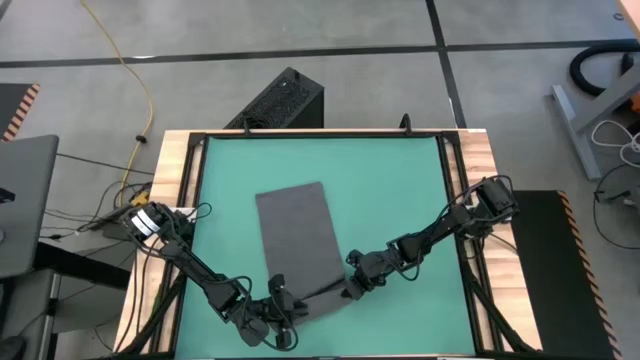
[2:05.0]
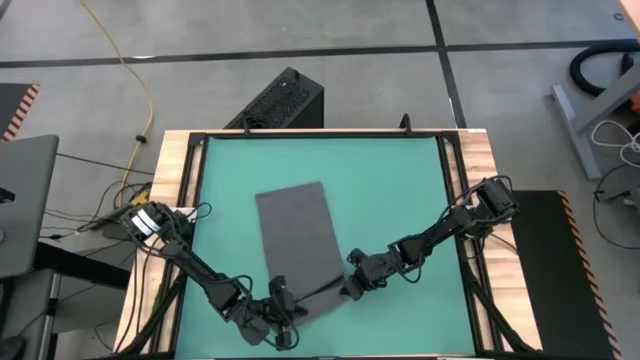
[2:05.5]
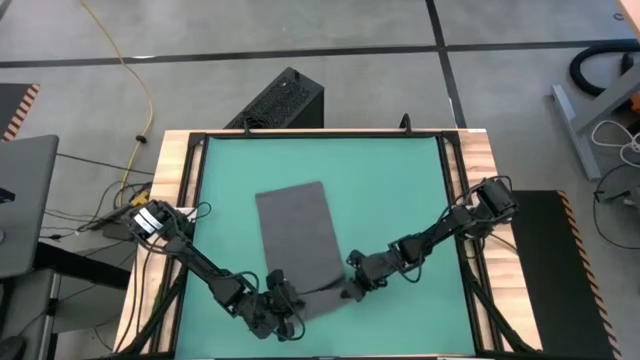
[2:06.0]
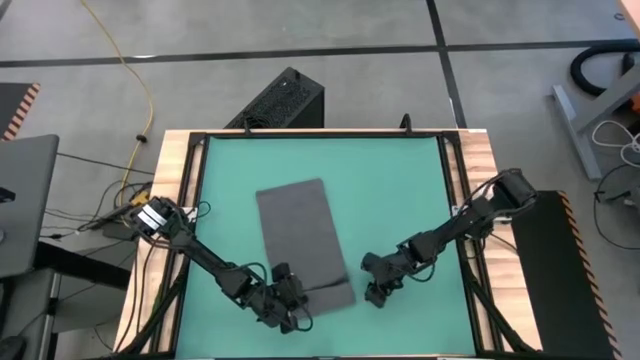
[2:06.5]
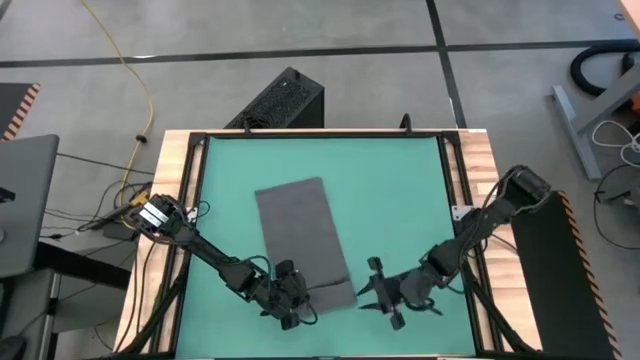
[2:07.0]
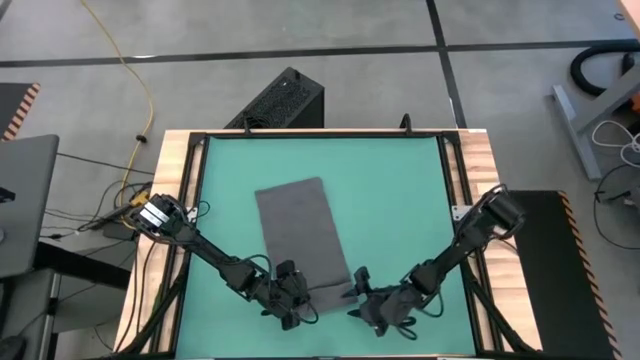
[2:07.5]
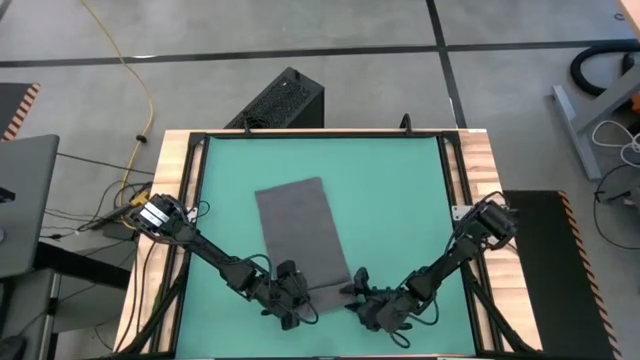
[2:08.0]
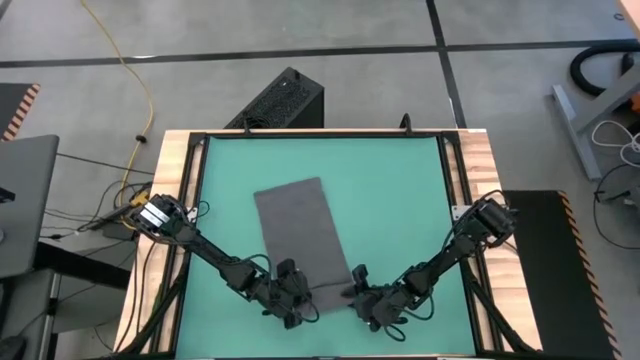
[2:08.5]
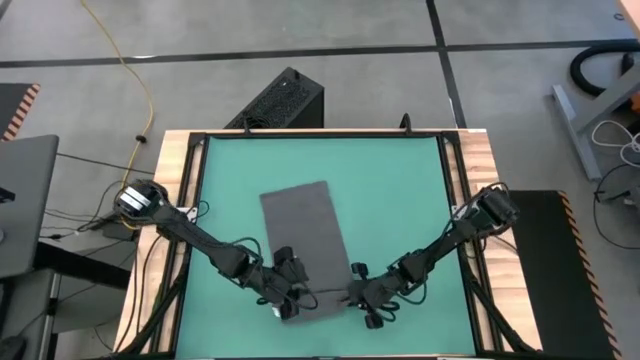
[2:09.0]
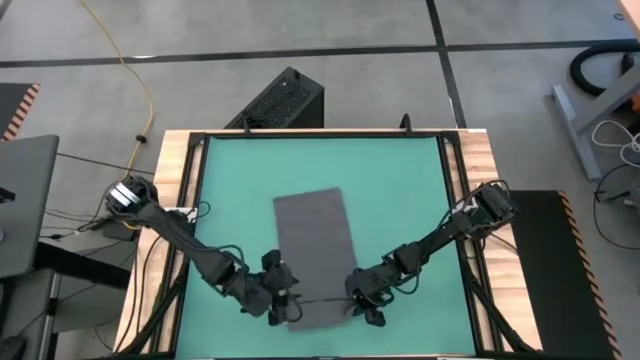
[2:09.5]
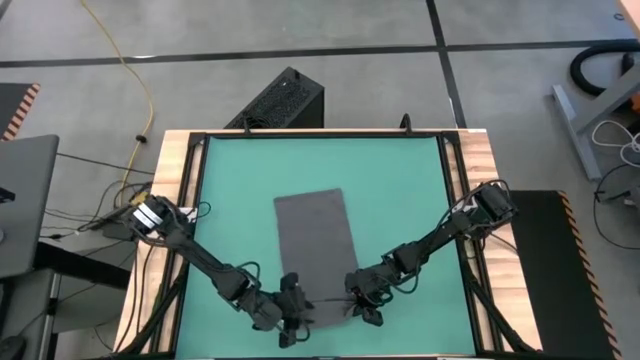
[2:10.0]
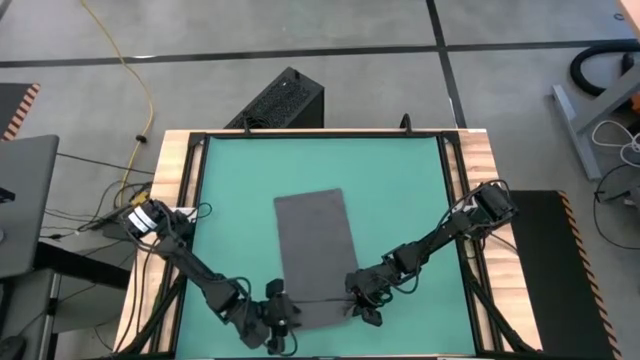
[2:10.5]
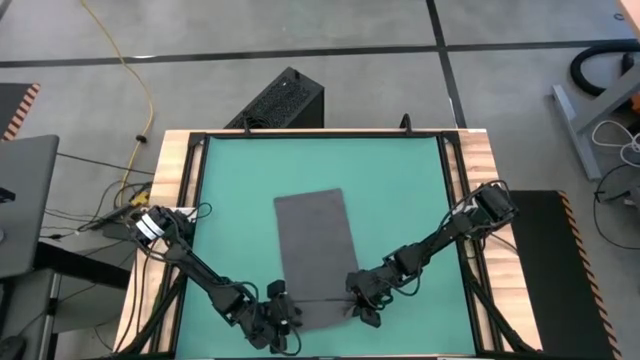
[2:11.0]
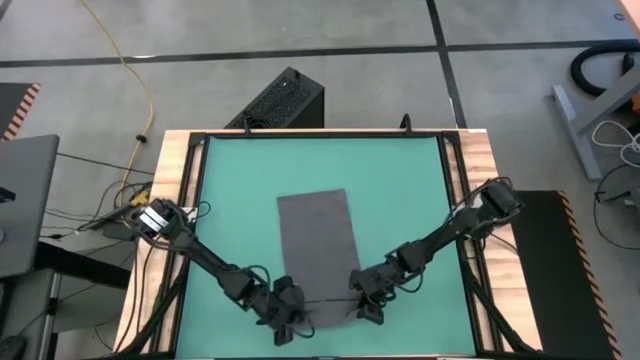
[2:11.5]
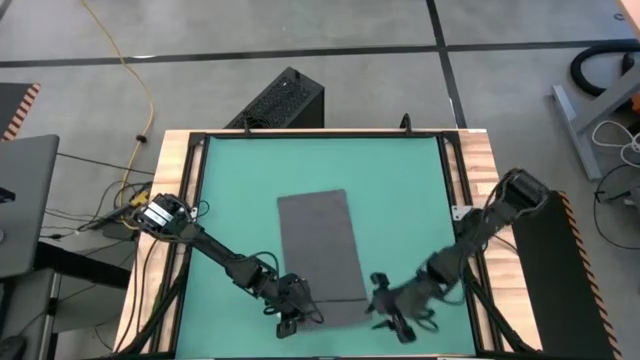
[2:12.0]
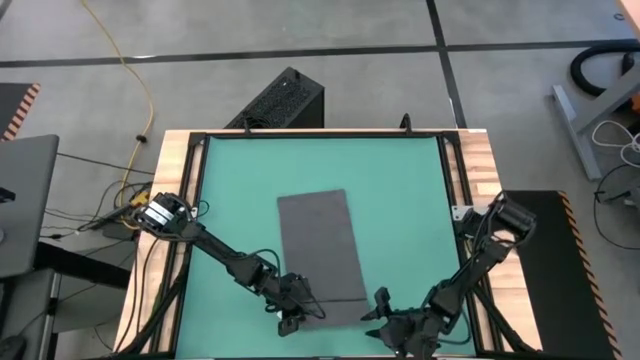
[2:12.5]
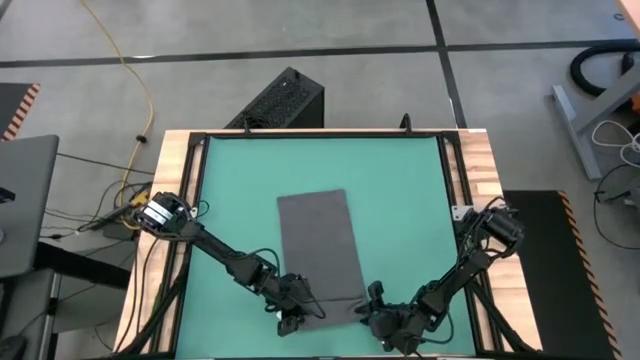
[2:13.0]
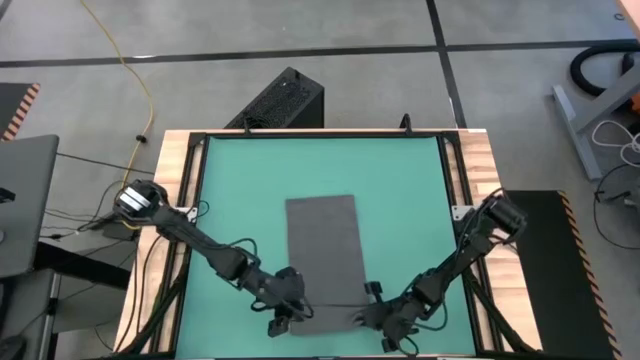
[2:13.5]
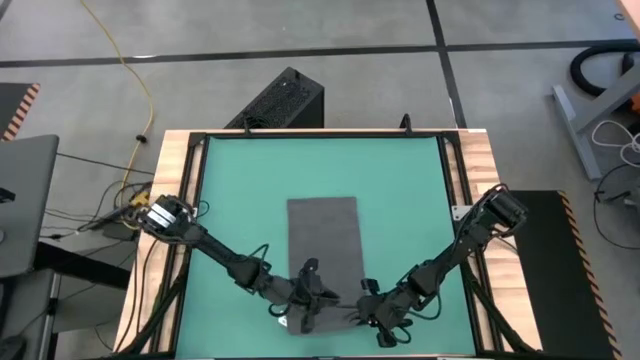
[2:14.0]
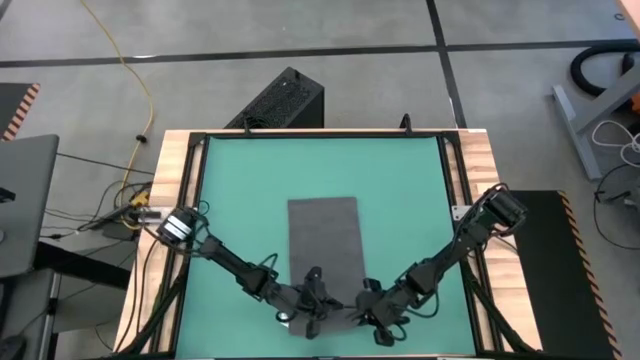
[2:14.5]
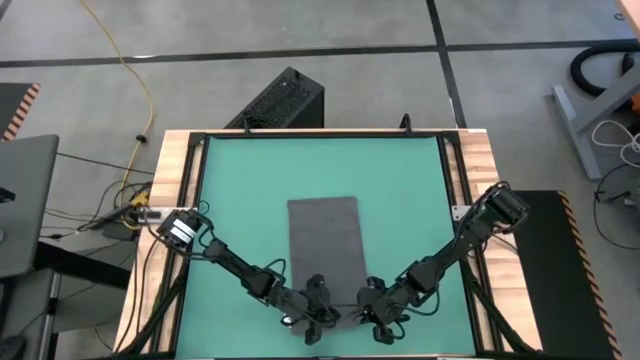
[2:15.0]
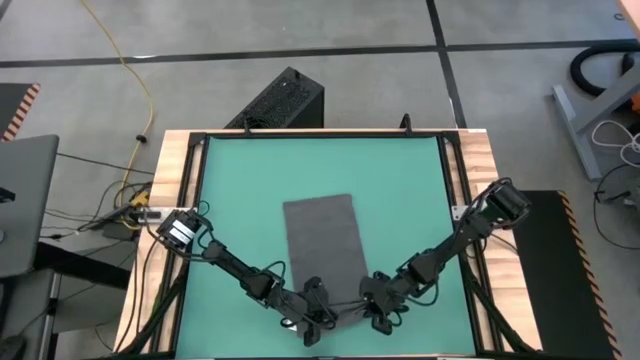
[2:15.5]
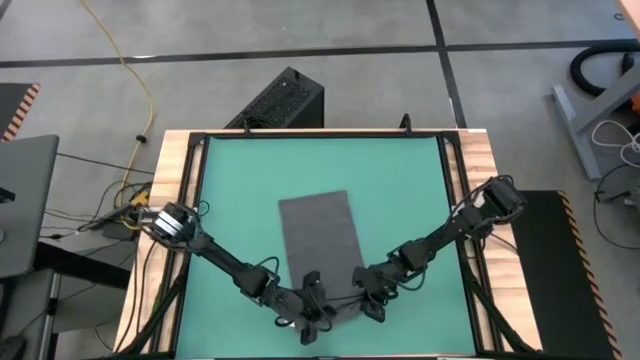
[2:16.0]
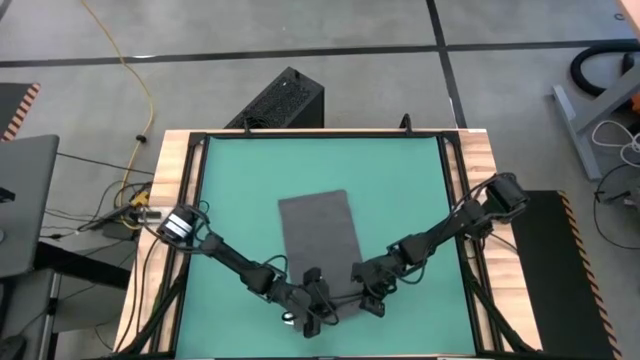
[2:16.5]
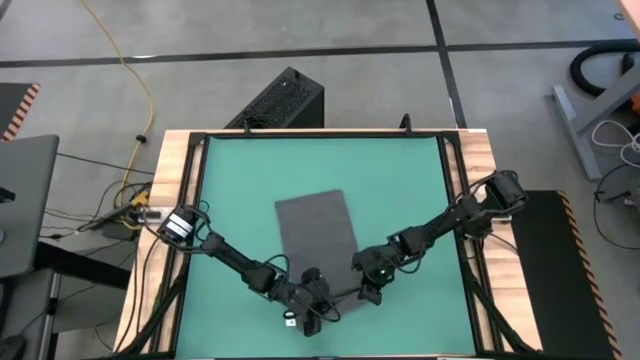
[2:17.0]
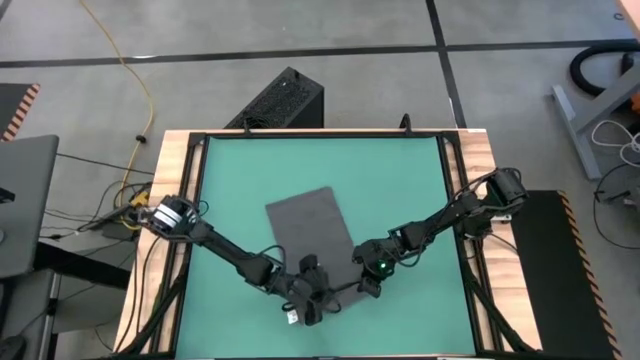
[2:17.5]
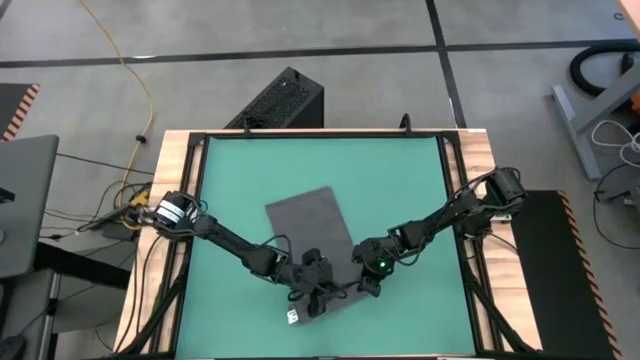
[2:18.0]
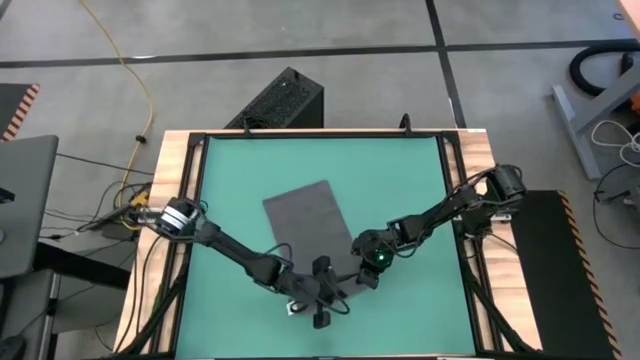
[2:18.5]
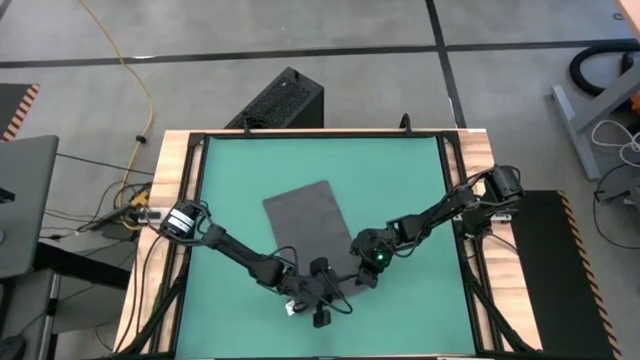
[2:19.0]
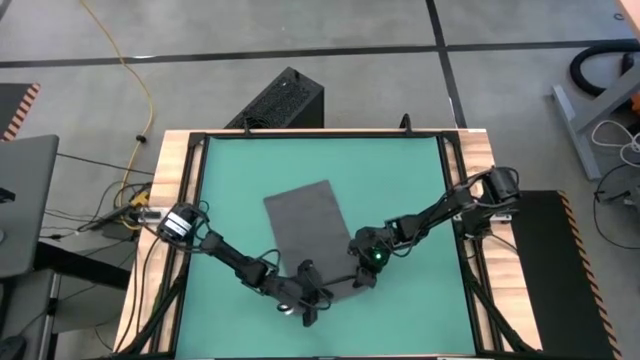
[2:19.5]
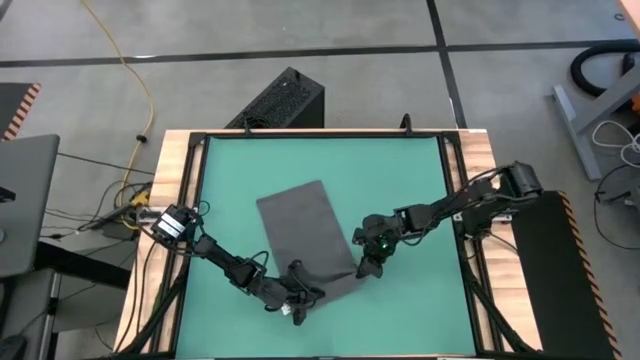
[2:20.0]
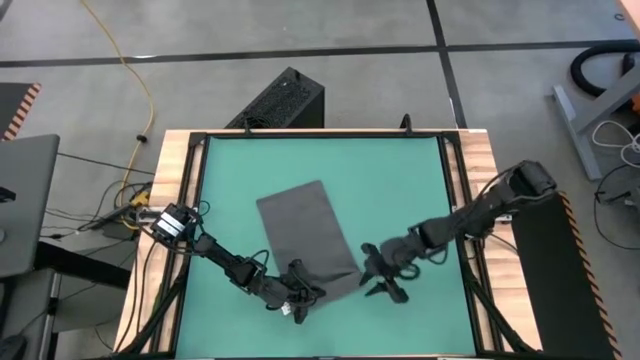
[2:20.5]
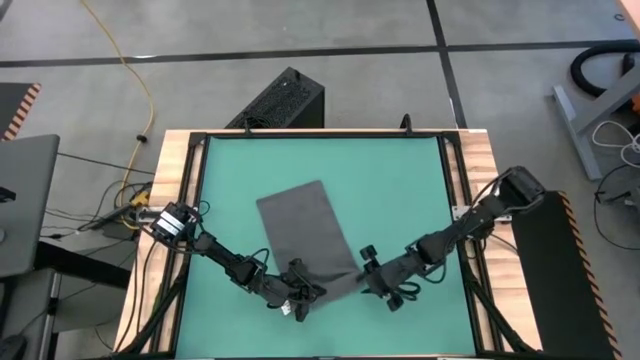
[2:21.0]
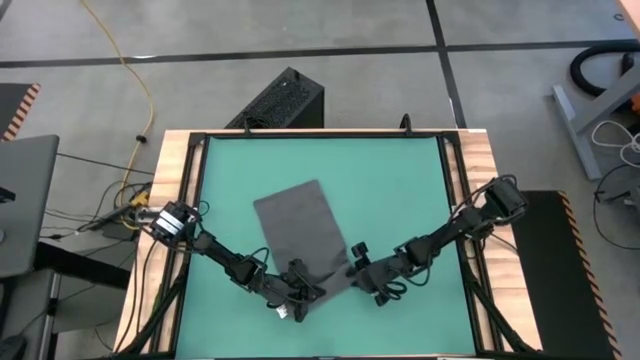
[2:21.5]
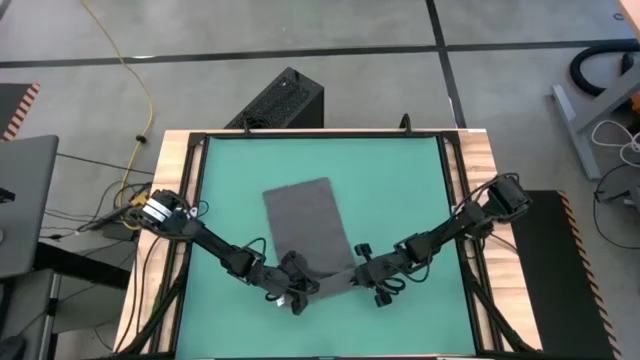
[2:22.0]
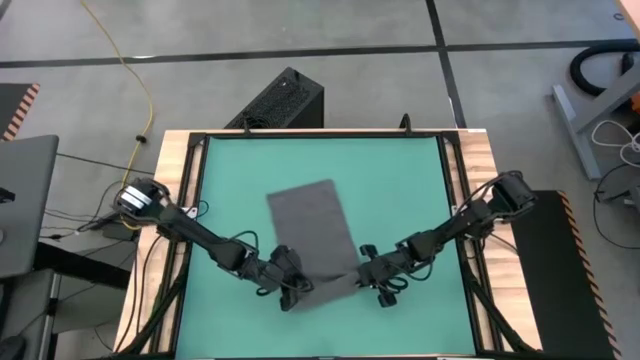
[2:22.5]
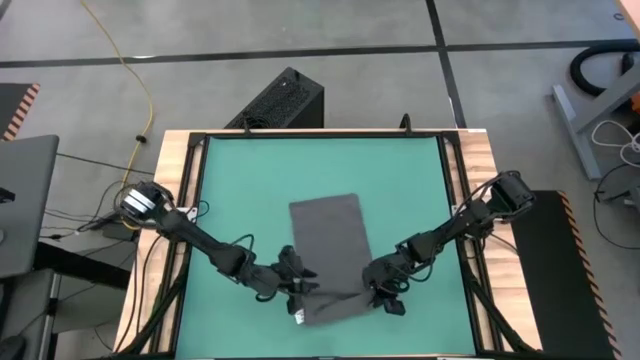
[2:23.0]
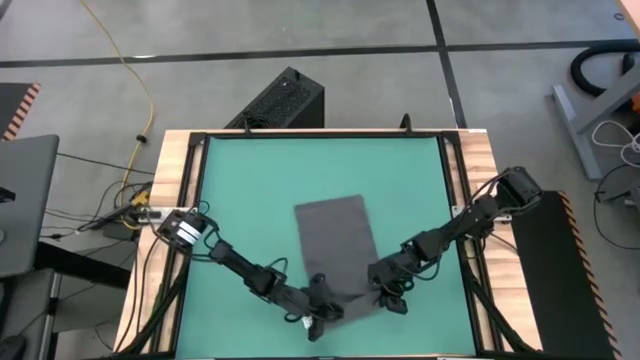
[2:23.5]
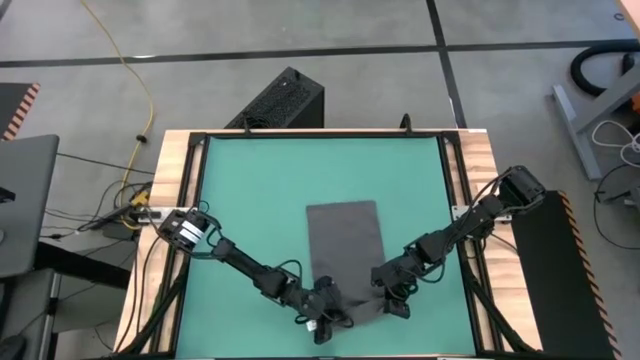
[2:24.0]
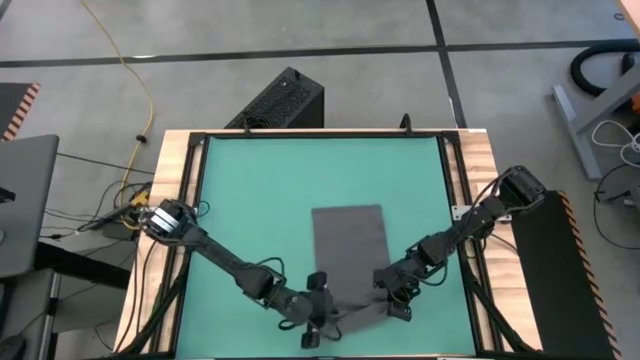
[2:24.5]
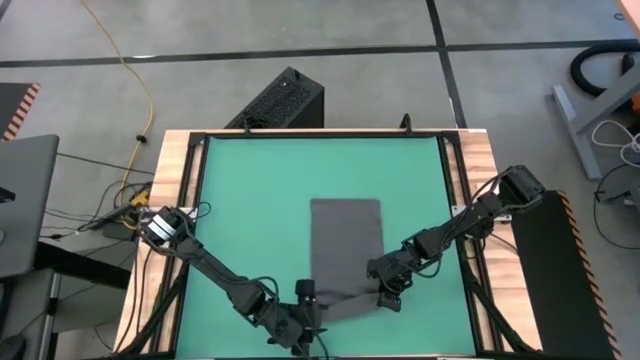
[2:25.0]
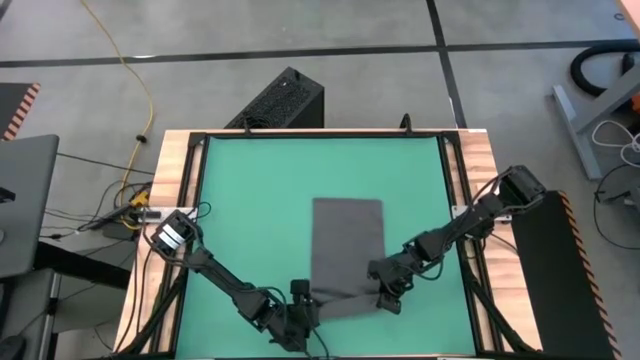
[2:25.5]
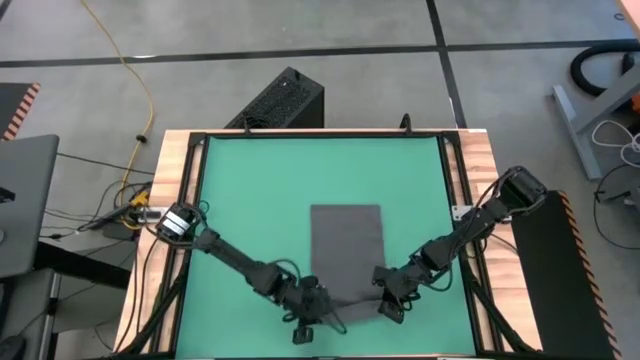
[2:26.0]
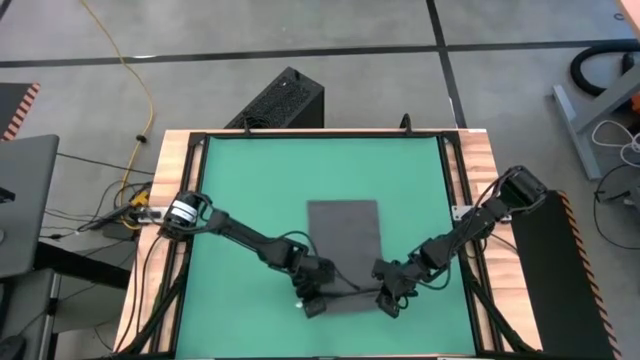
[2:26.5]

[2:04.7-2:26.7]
Task: Roll towel
Roll the gray towel
